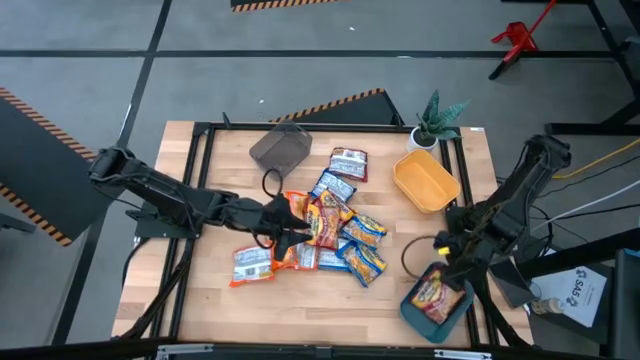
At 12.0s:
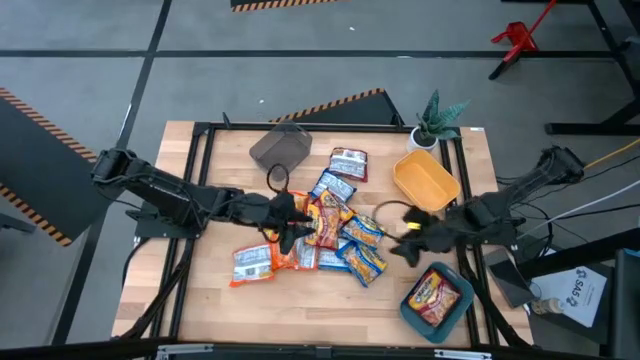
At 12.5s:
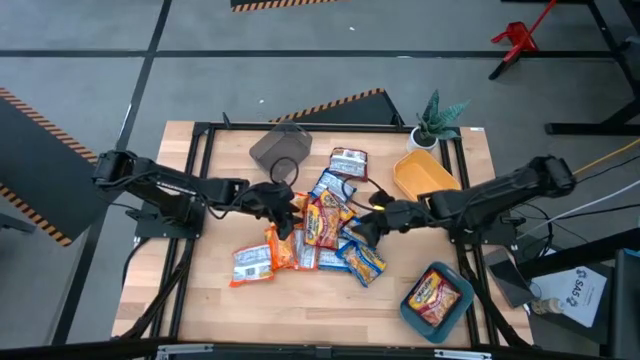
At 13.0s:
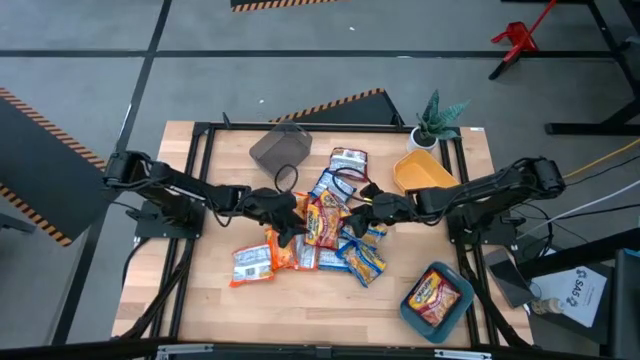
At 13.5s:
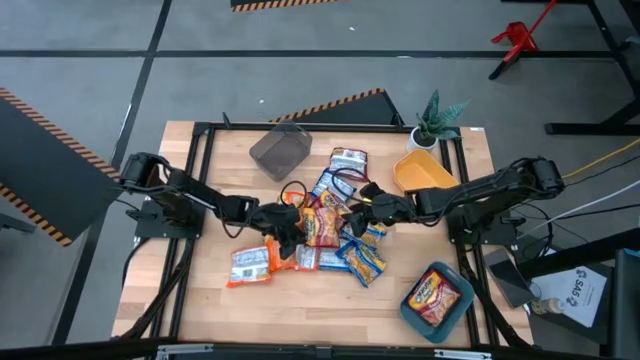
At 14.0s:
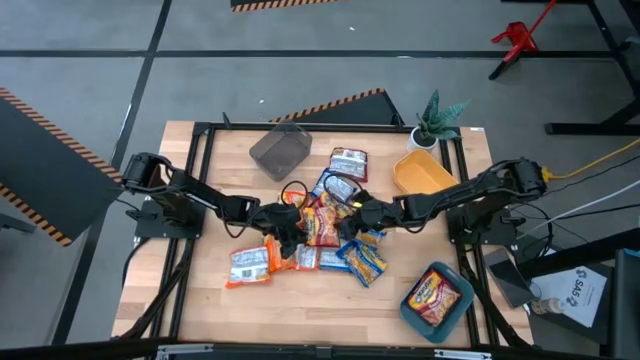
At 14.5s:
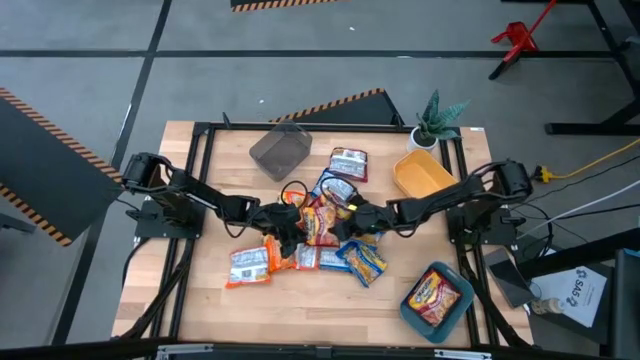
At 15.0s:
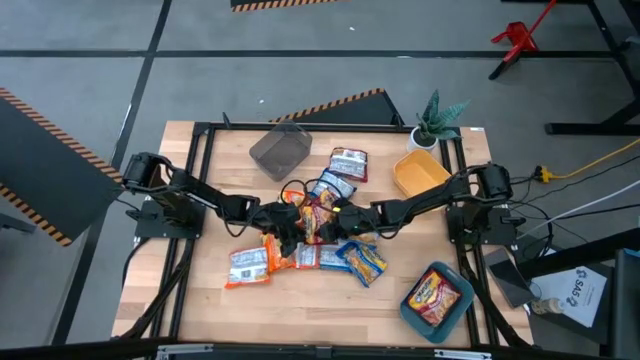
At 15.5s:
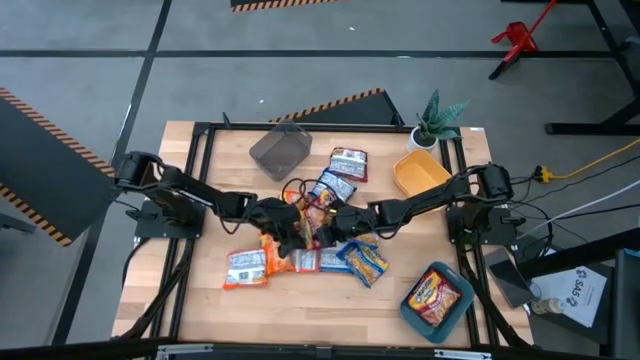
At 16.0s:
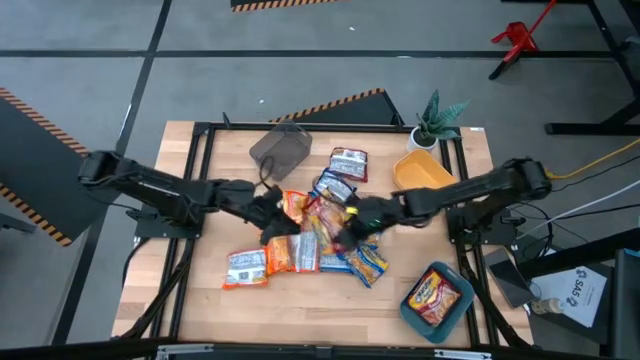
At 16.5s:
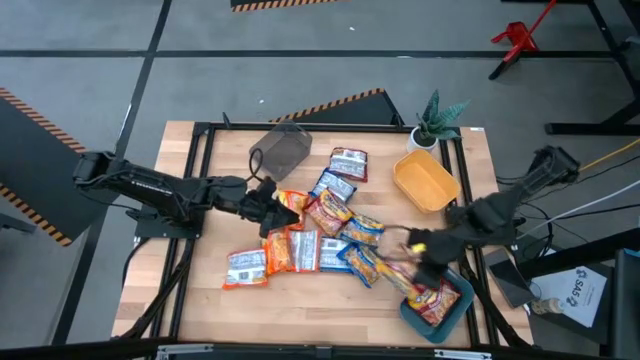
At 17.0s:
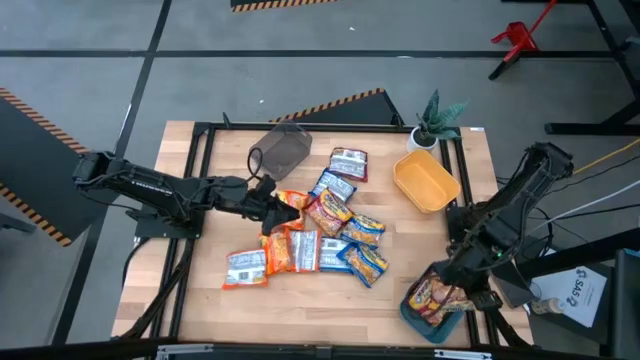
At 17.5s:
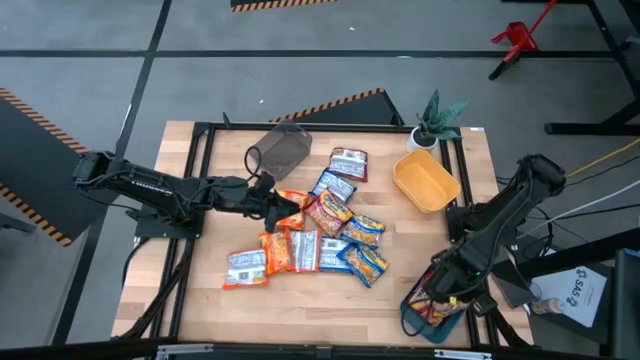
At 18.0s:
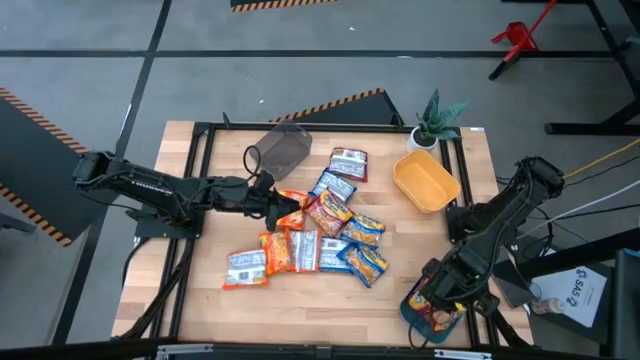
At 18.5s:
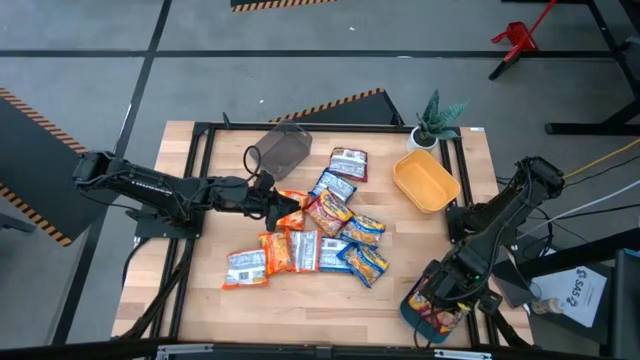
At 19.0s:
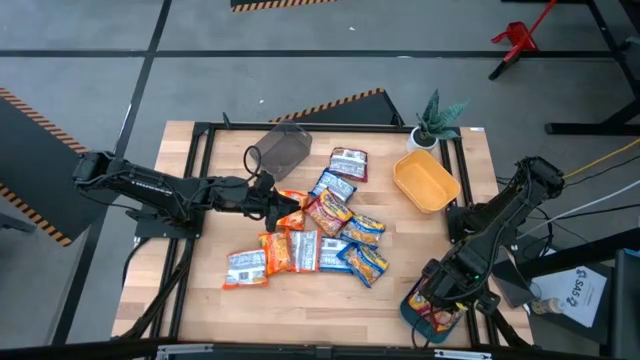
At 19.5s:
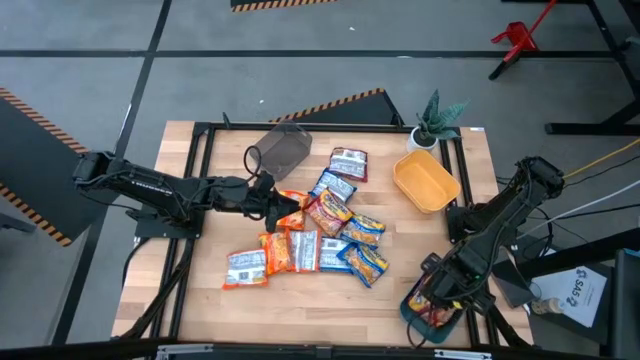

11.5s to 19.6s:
Task: Sort Maruchan noodles
Put the red noodle pack into the blue bin

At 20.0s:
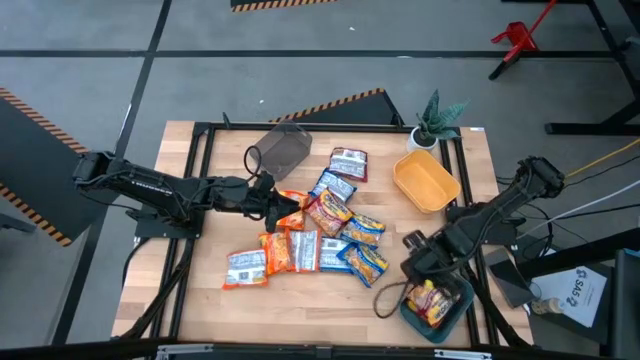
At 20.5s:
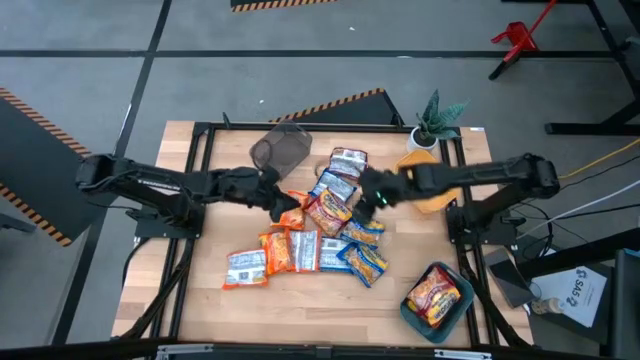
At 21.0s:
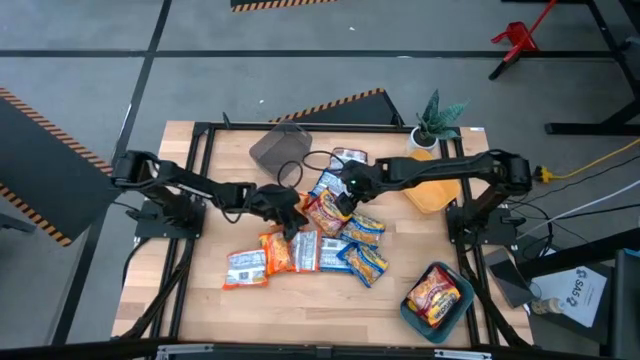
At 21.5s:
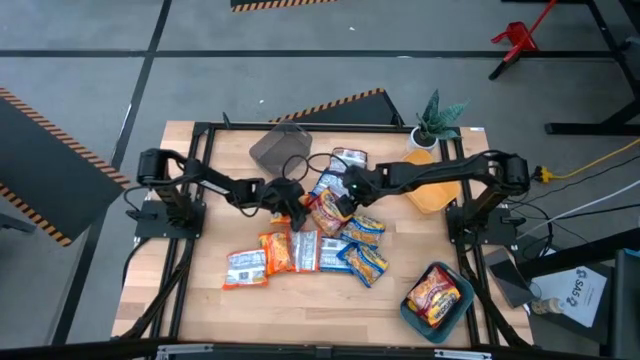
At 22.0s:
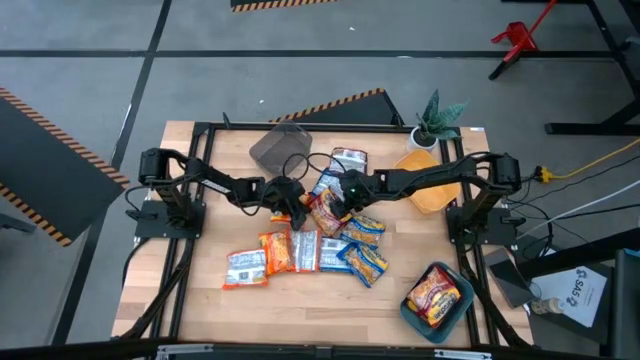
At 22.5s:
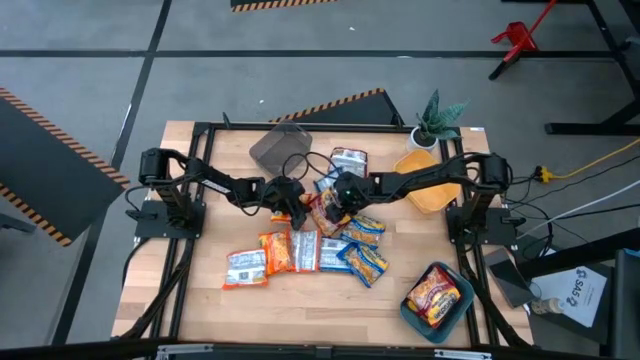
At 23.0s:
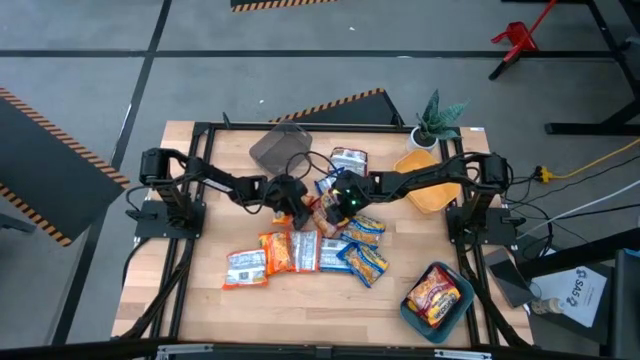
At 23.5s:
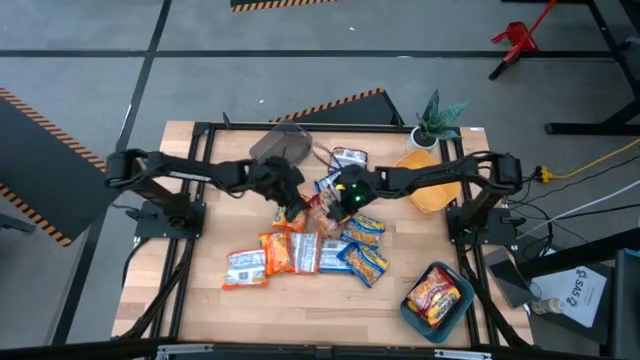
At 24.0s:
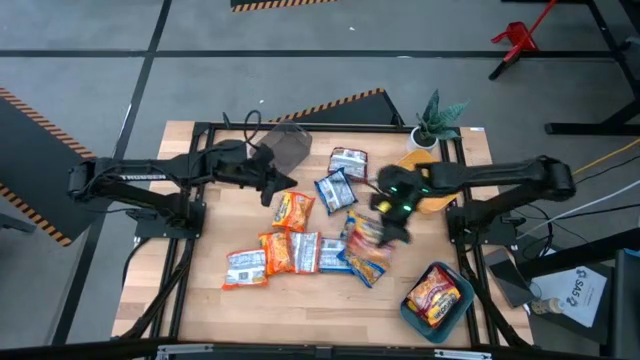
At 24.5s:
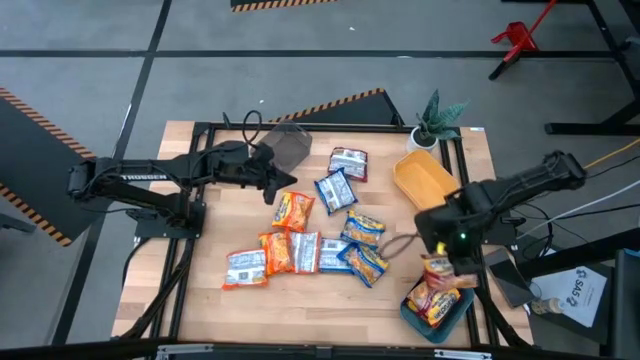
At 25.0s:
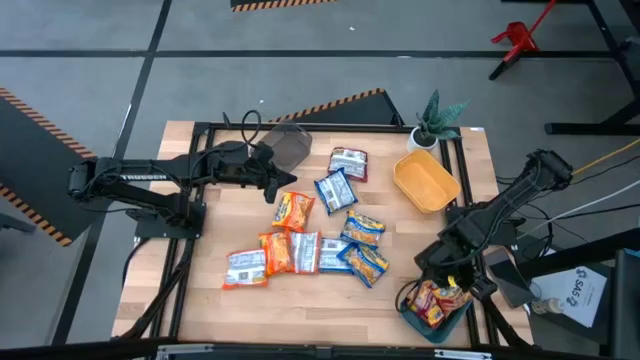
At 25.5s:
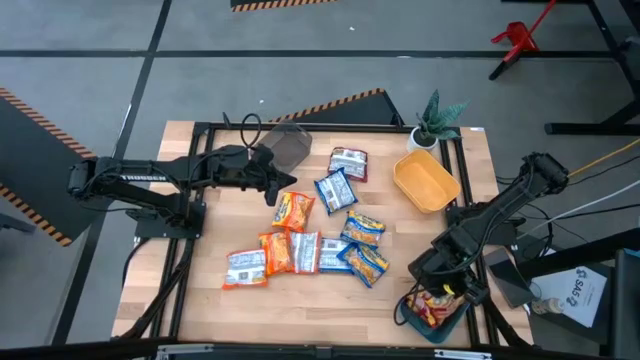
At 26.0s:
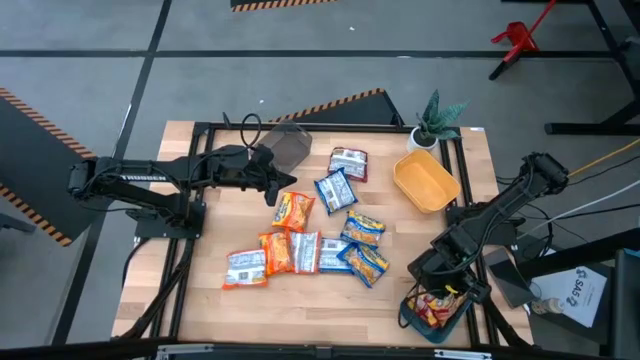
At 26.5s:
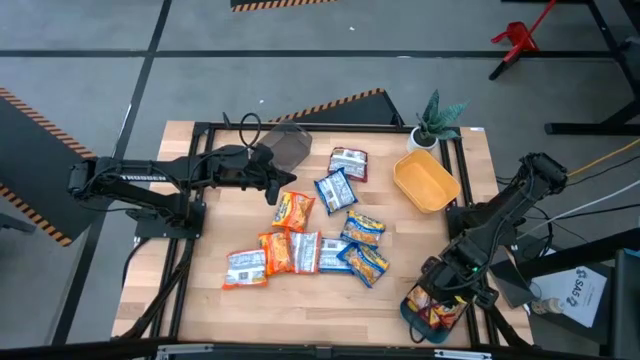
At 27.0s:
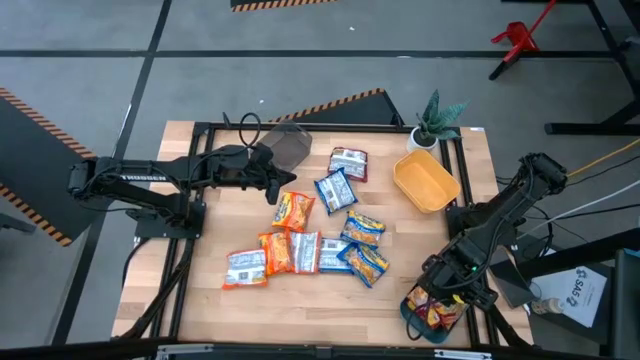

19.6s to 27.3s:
Put the red noodle pack into the blue bin

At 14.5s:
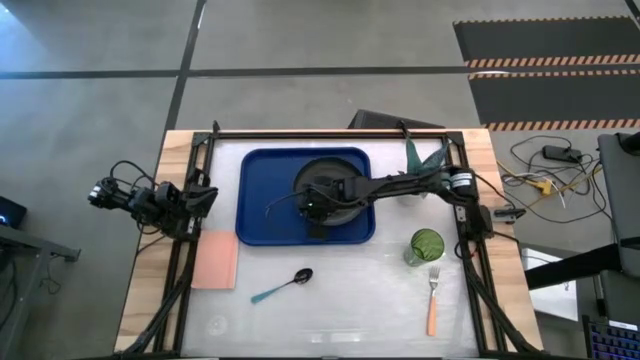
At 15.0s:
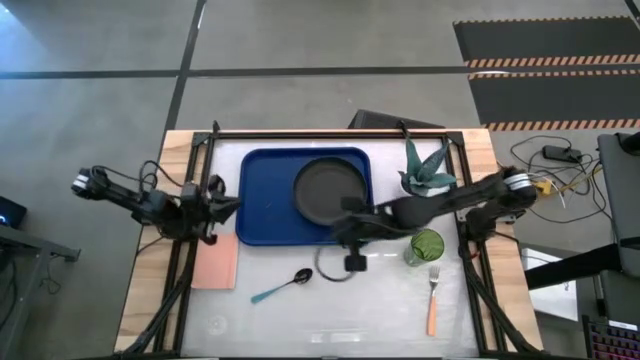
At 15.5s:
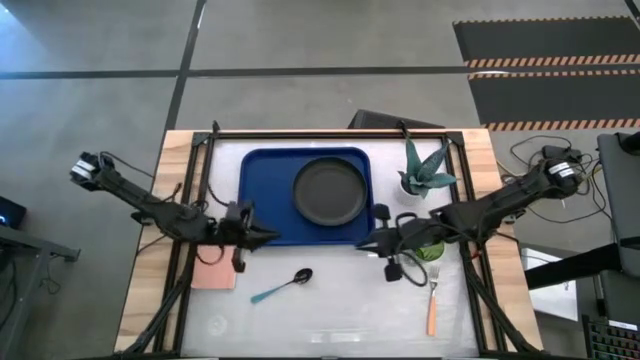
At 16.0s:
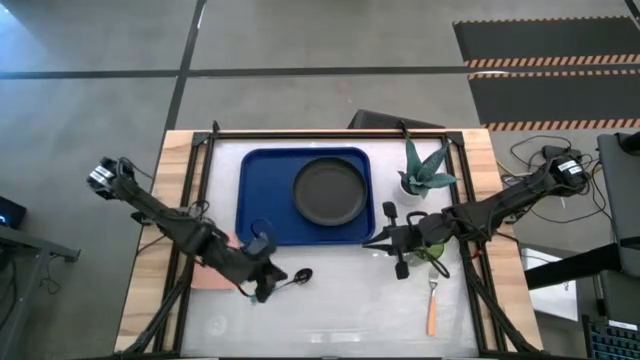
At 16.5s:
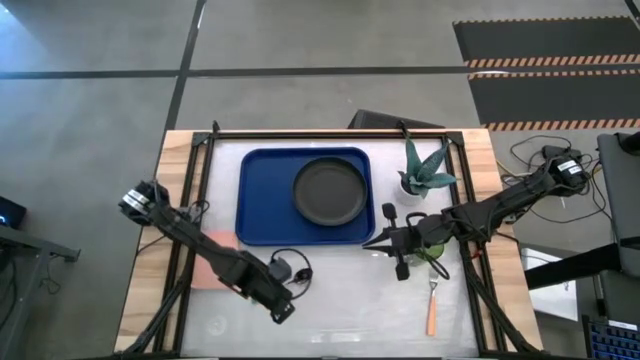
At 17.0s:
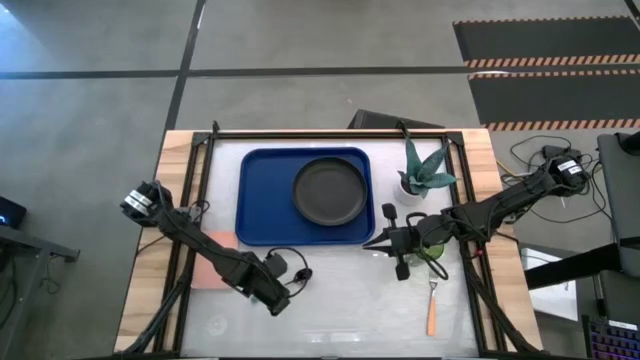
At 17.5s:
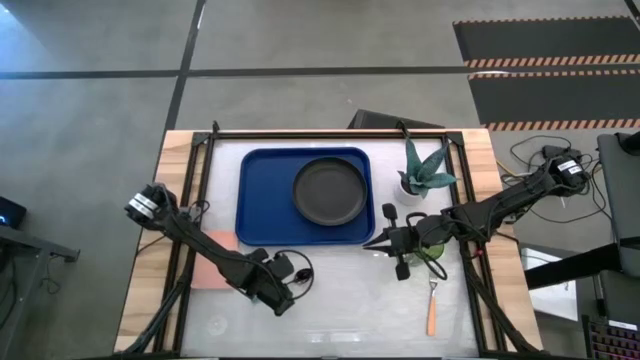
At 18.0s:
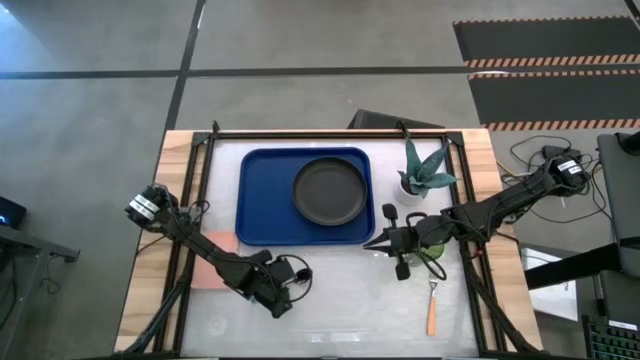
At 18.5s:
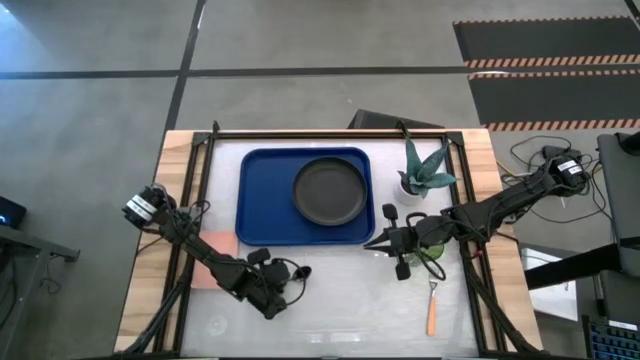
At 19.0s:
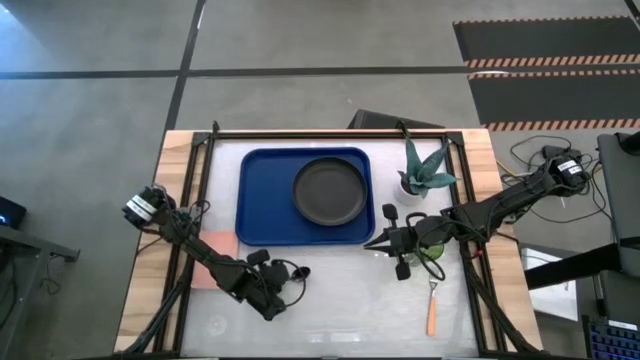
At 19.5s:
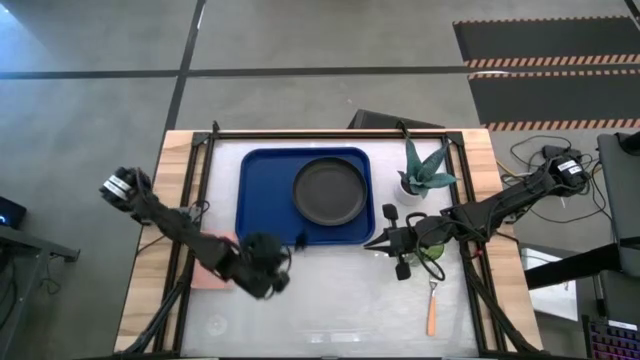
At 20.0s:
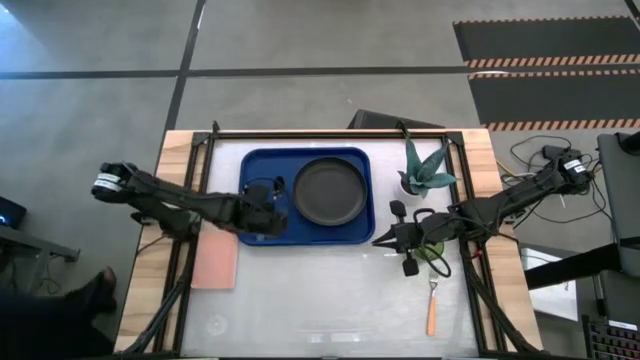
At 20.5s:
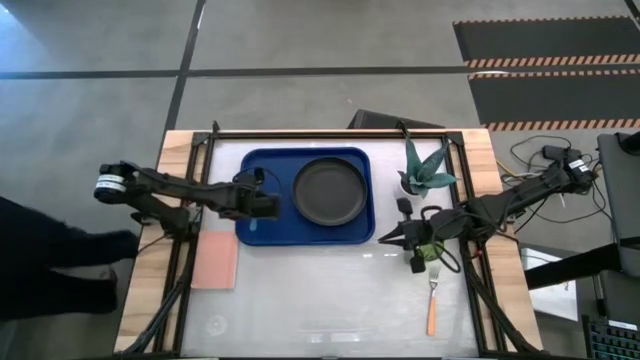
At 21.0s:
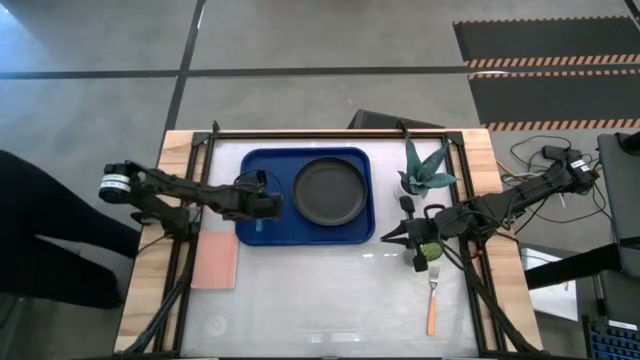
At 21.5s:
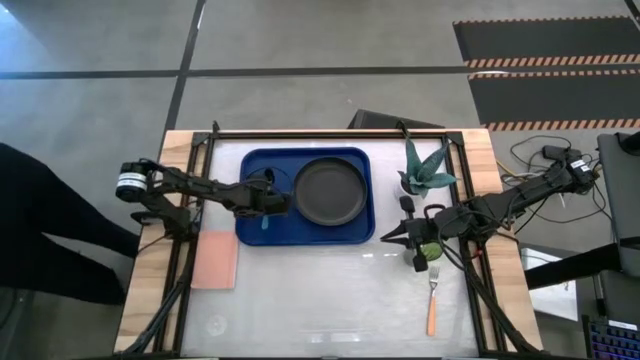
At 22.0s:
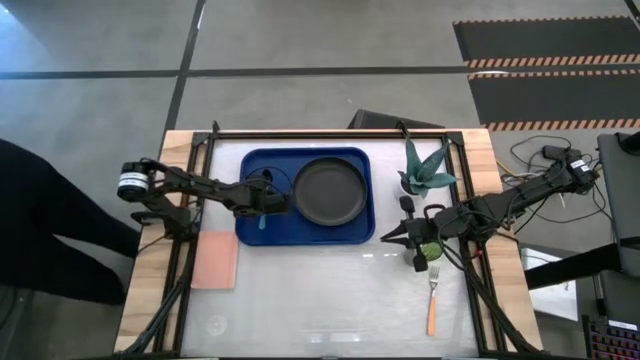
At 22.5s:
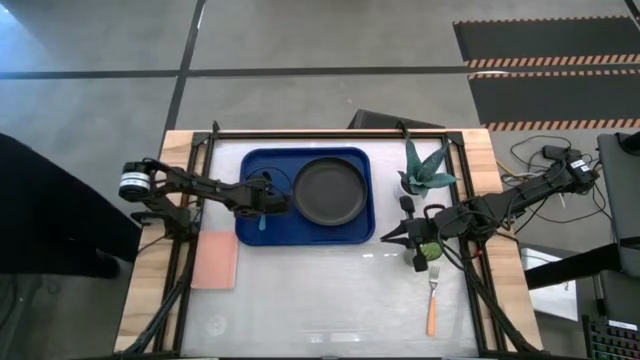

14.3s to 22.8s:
Task: Pick and place plate/cup/fork/spoon on tray
Put the blue spoon to the left of the black plate on the blue serving tray
